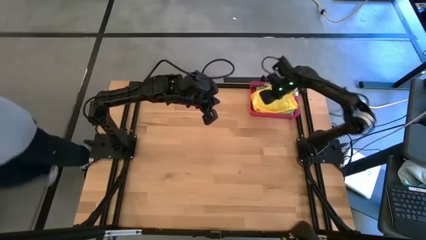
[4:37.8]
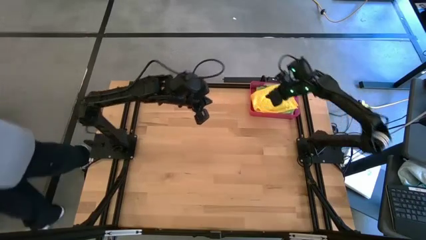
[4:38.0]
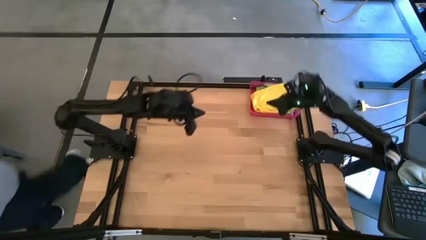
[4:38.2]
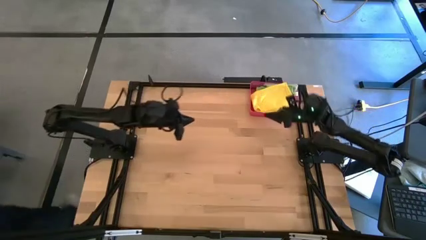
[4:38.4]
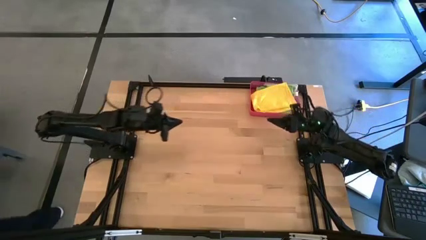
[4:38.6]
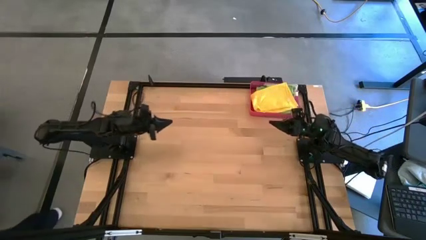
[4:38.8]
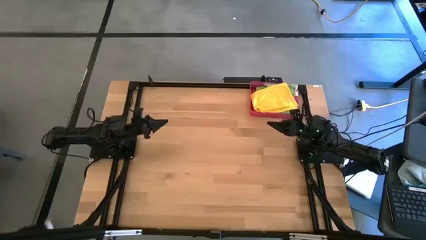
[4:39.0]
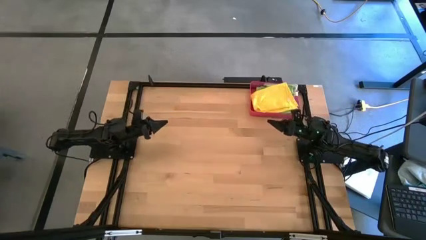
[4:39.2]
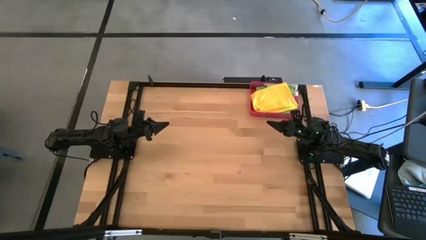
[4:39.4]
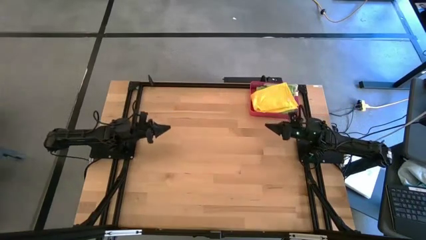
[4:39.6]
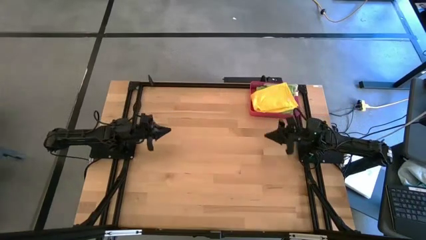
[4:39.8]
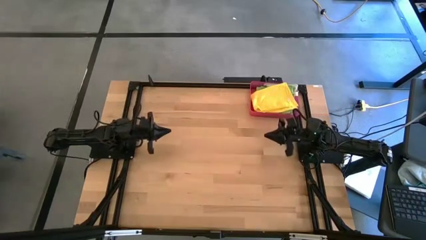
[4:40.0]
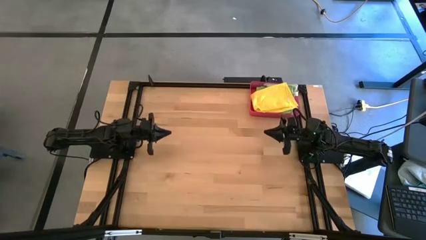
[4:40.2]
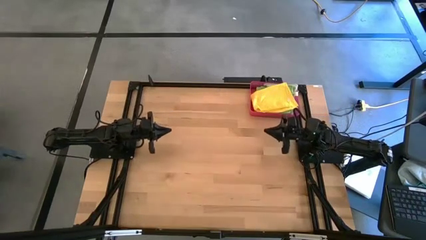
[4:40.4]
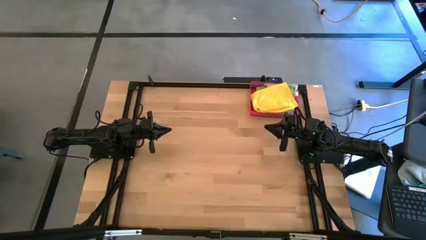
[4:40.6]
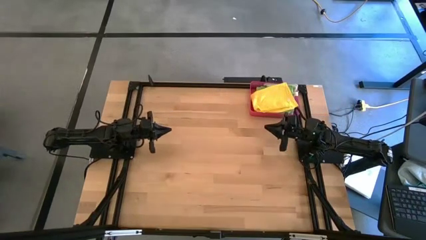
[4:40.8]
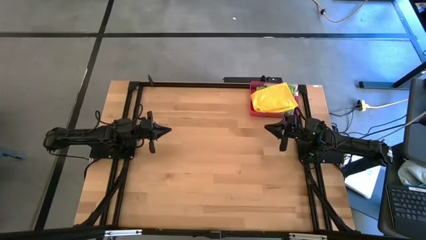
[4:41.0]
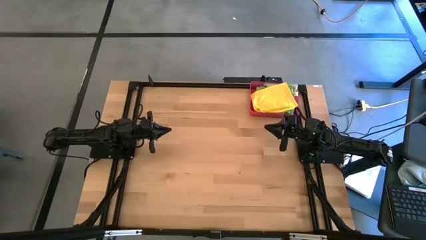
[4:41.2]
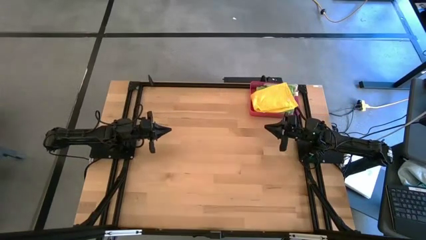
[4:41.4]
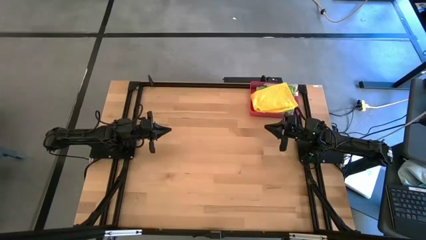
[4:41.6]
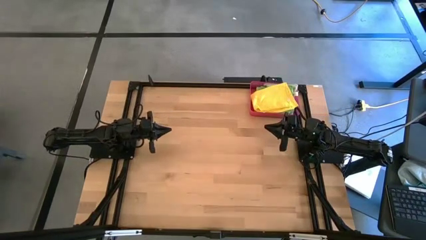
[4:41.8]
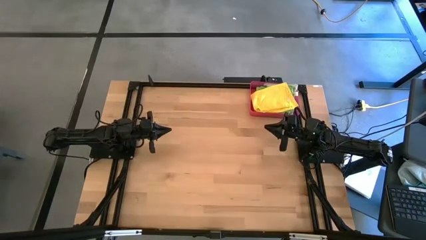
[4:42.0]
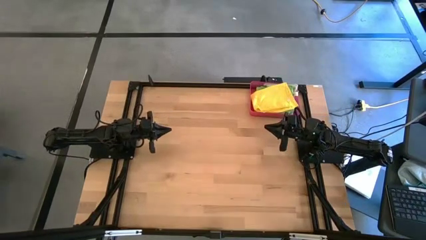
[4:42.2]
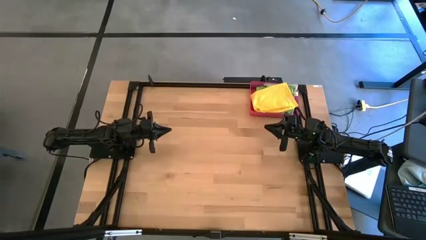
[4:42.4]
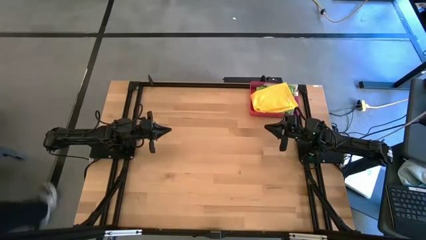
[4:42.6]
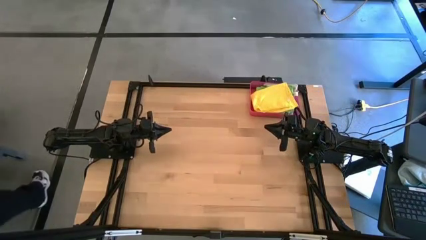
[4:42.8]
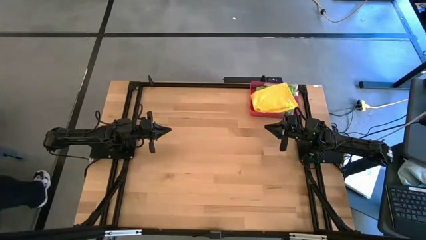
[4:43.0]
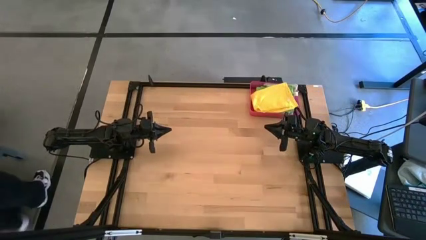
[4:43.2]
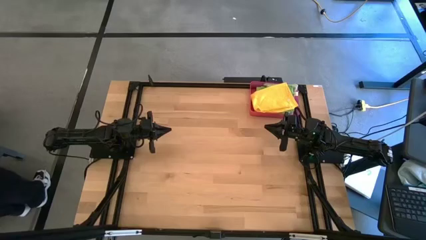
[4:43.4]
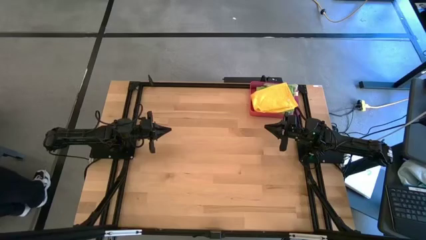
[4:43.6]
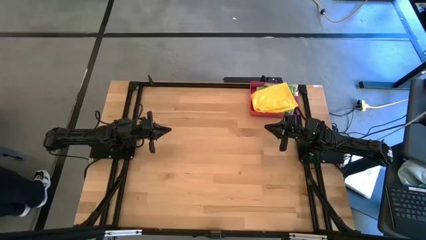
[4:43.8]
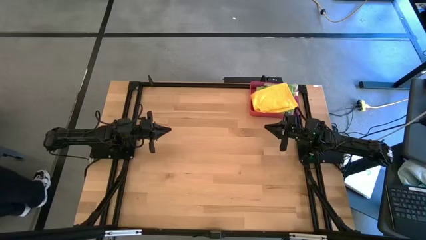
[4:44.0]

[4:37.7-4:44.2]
Task: Fold microfiber towels
Return to Home Position

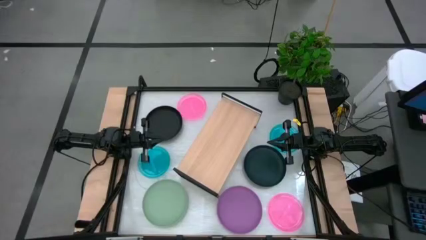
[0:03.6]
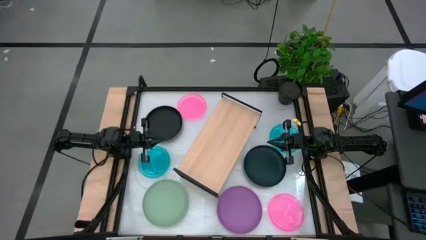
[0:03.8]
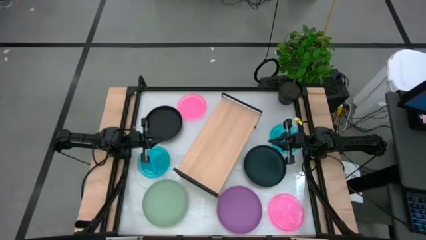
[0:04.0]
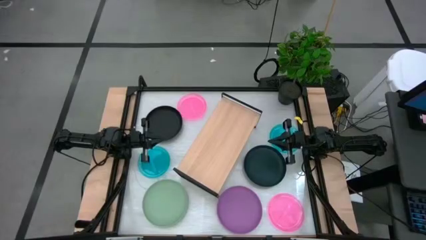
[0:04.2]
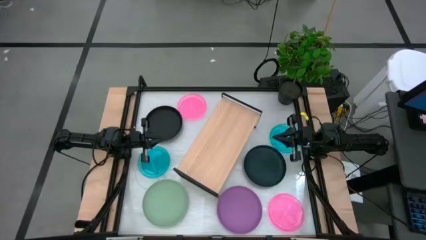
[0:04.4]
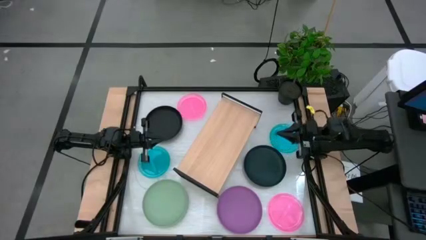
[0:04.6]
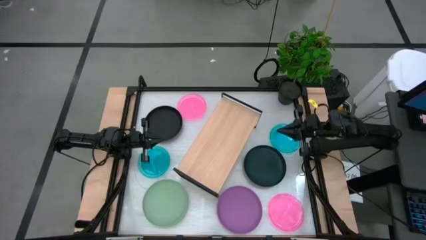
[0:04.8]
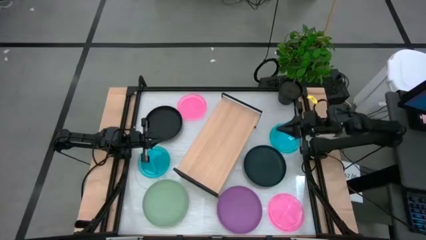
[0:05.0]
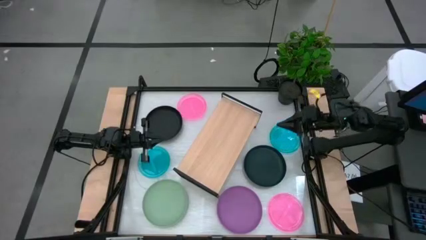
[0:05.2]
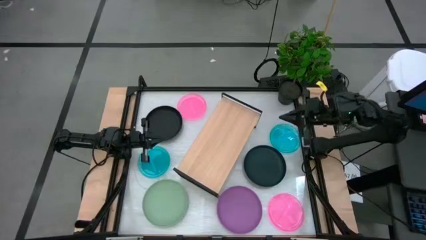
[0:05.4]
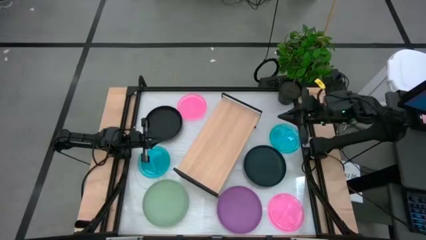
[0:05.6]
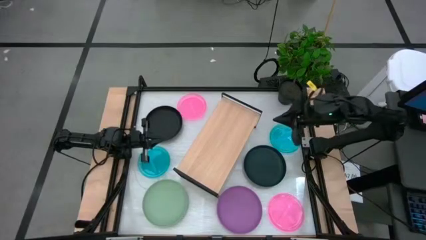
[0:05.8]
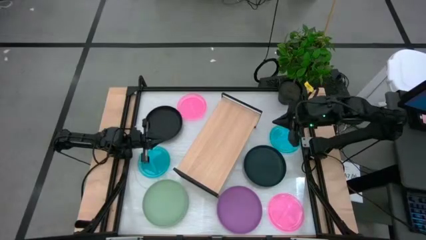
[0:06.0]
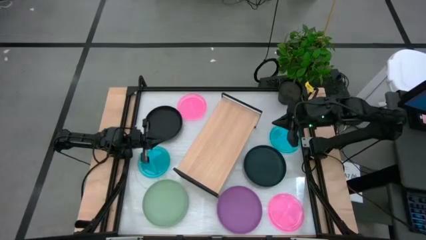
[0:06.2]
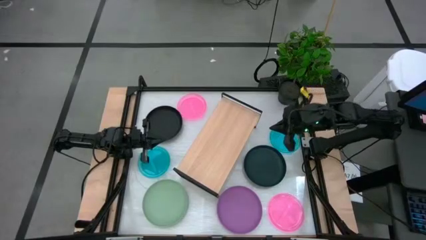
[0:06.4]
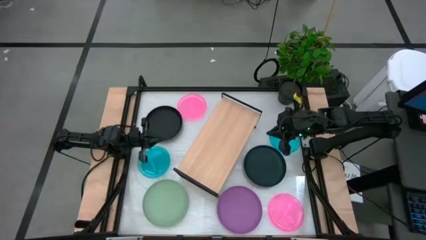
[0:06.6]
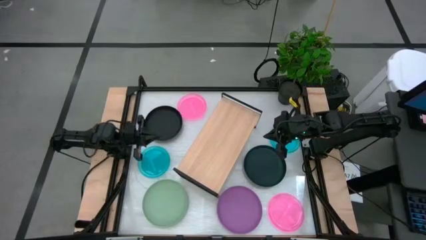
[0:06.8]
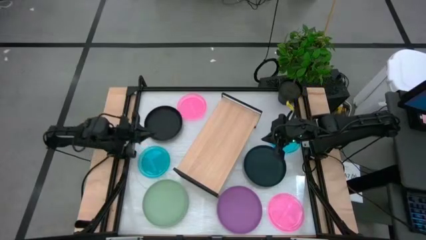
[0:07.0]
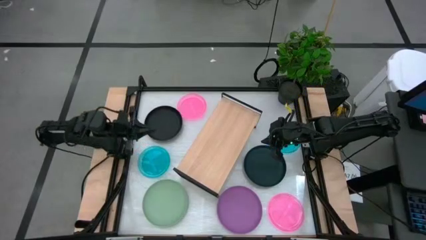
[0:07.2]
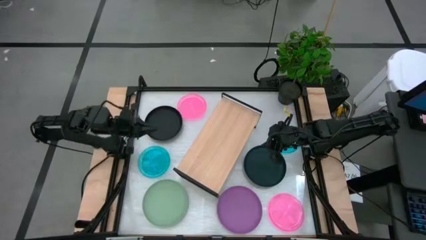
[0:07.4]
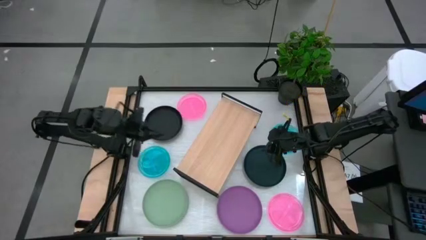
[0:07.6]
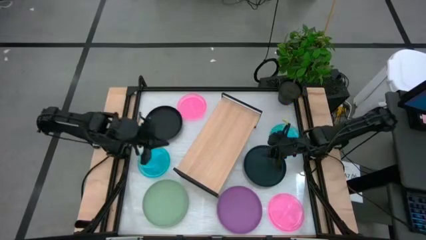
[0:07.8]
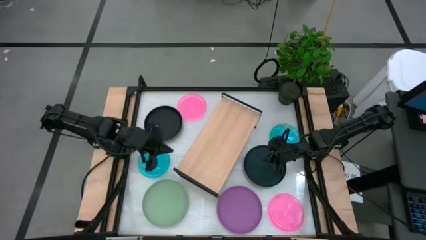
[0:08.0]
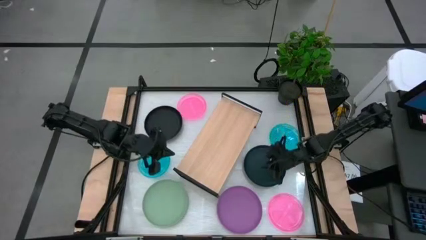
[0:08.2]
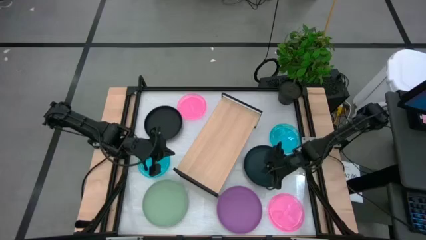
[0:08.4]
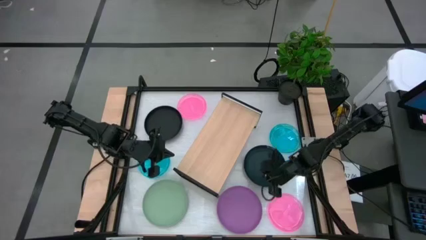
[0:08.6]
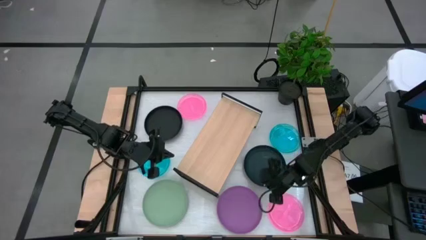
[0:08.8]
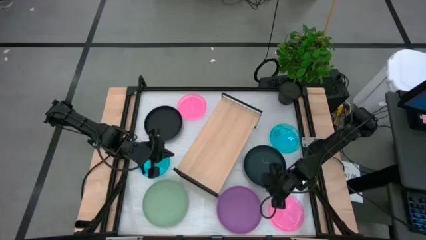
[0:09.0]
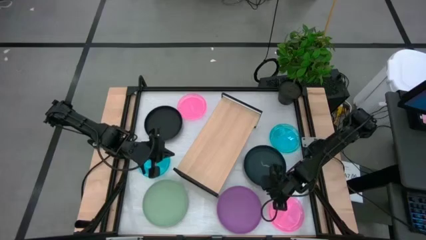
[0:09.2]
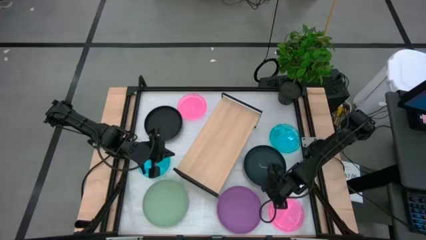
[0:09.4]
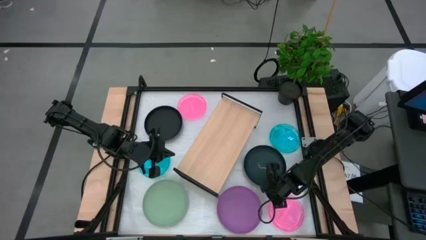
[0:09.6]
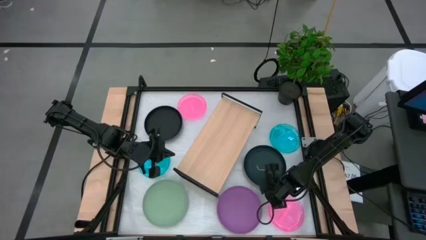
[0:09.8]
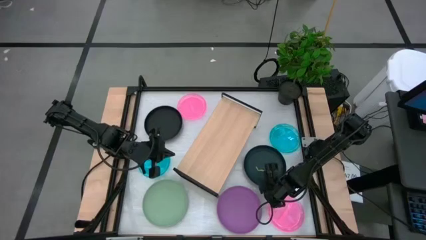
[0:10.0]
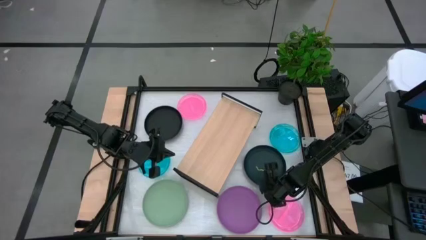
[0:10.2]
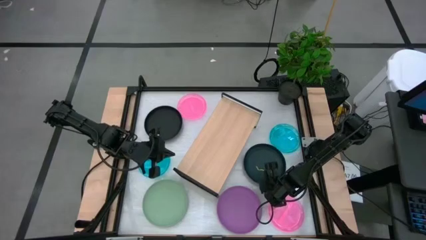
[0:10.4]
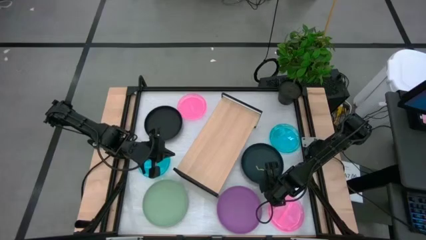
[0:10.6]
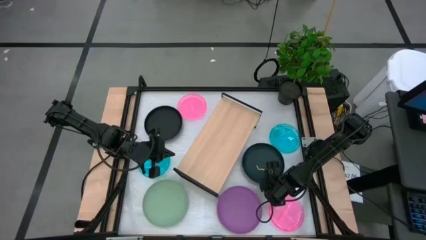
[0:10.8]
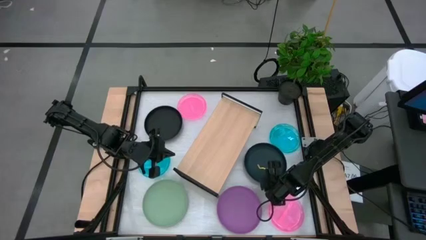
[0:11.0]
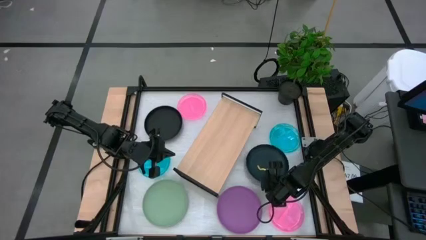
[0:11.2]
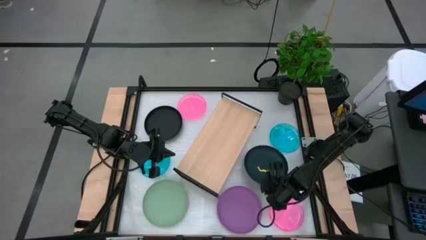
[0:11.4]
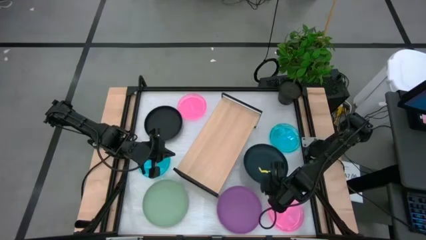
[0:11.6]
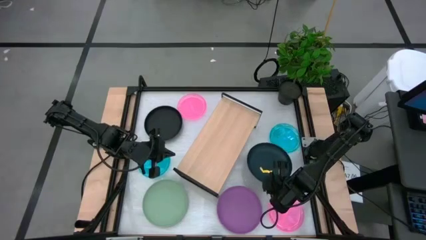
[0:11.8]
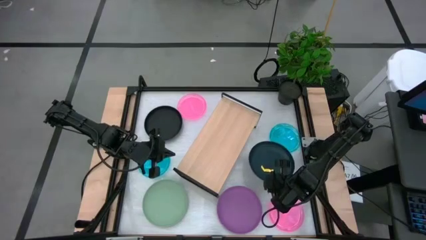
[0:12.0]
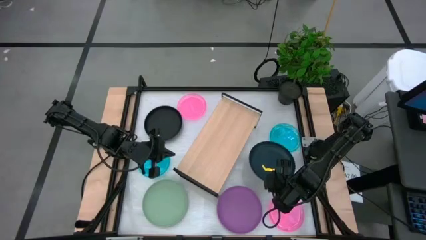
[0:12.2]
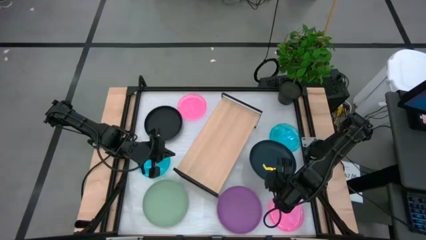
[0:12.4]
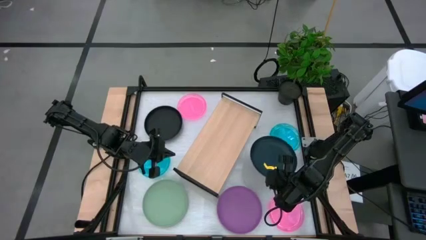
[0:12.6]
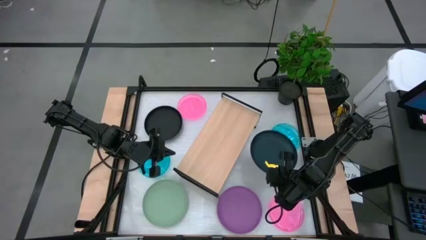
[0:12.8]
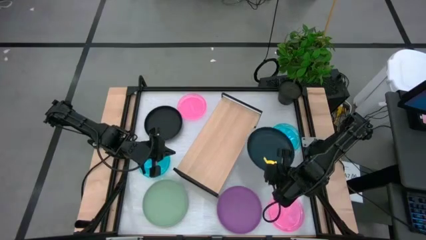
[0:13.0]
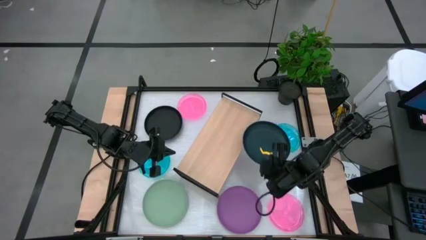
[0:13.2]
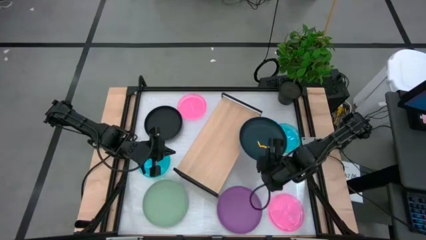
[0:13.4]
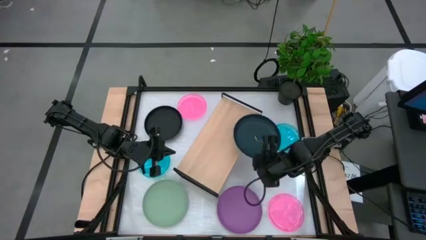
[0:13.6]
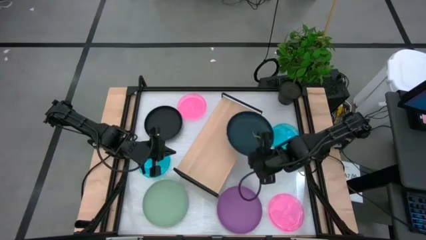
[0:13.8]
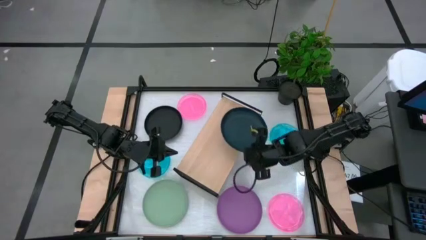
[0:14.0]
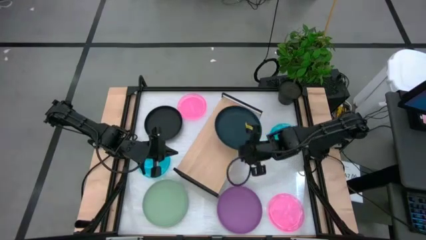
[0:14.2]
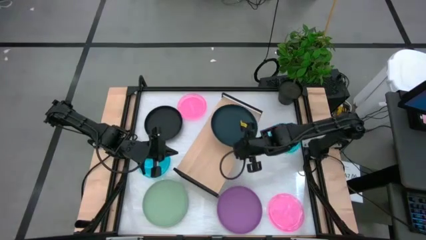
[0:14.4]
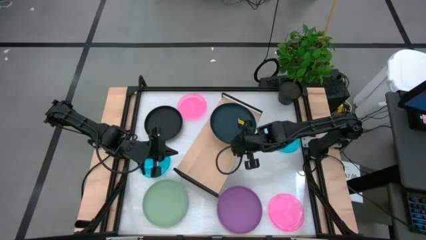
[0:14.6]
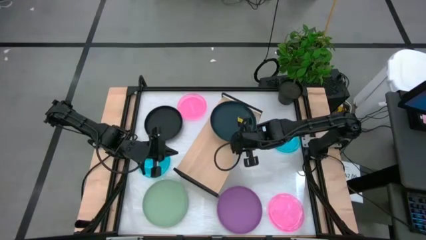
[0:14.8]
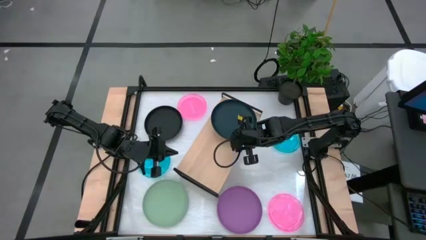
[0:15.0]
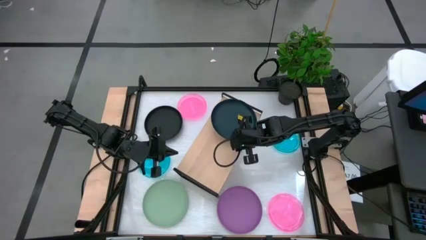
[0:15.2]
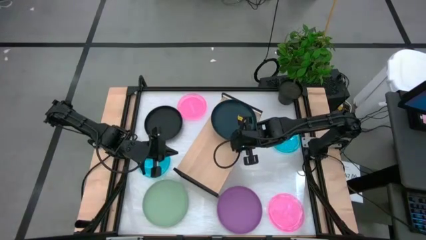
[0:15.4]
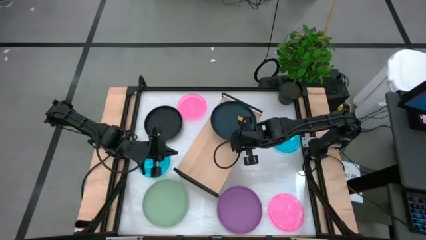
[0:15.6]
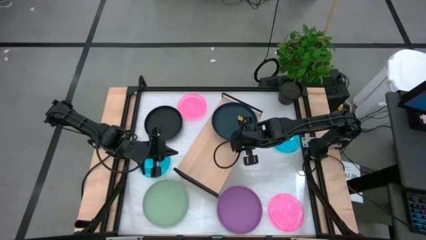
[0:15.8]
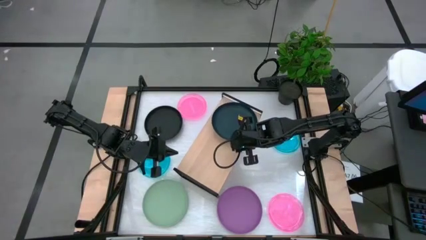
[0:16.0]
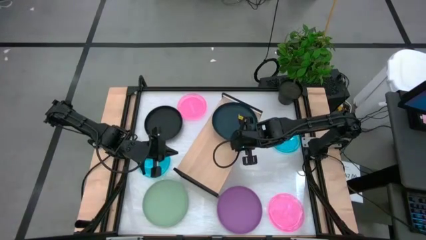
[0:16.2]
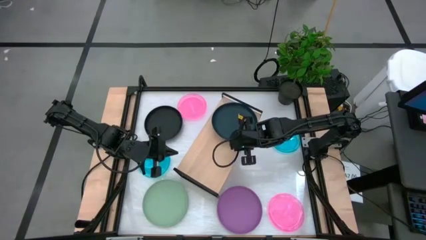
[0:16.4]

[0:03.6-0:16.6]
Task: Place and stack plates onto a shelf
Put the big dark green plate on top of the shelf
